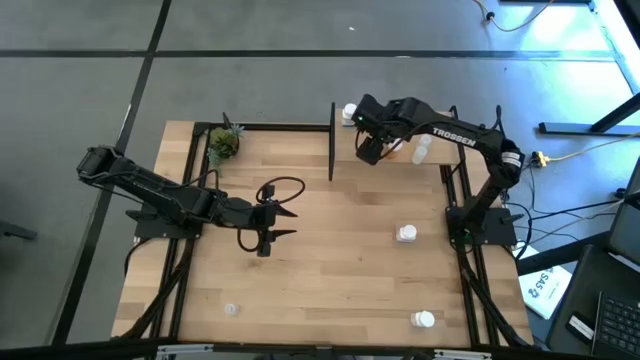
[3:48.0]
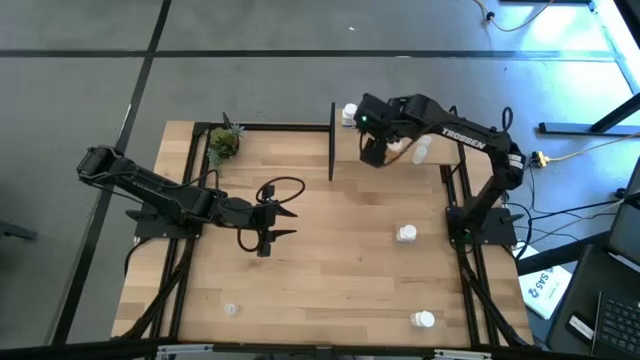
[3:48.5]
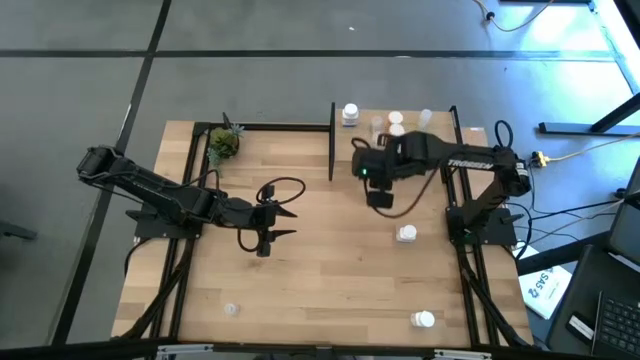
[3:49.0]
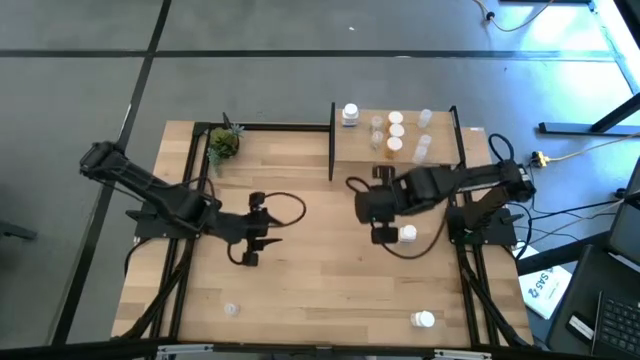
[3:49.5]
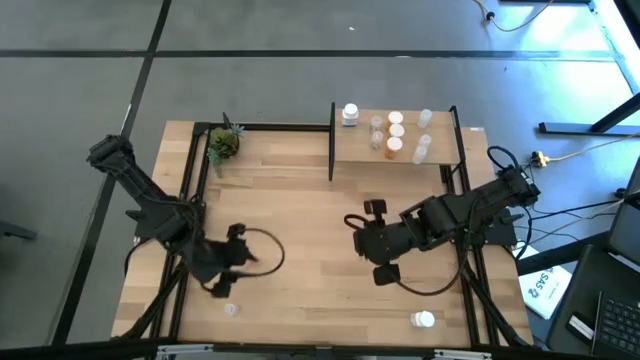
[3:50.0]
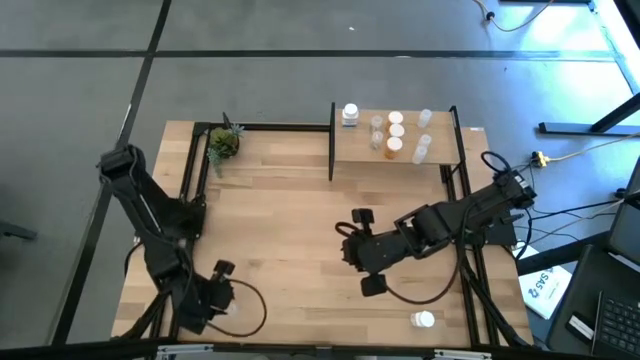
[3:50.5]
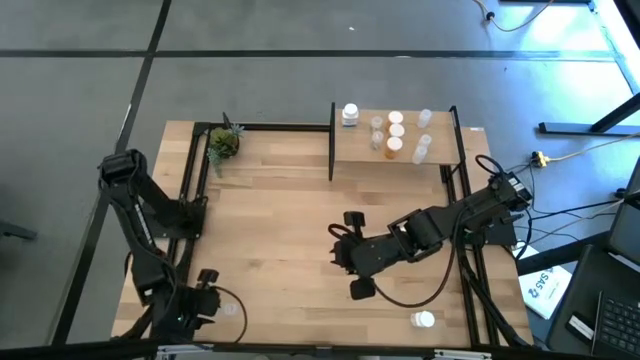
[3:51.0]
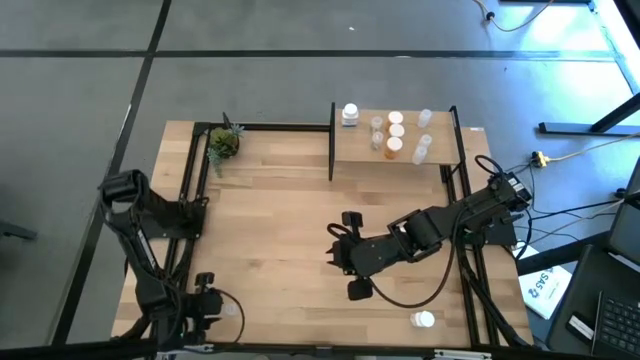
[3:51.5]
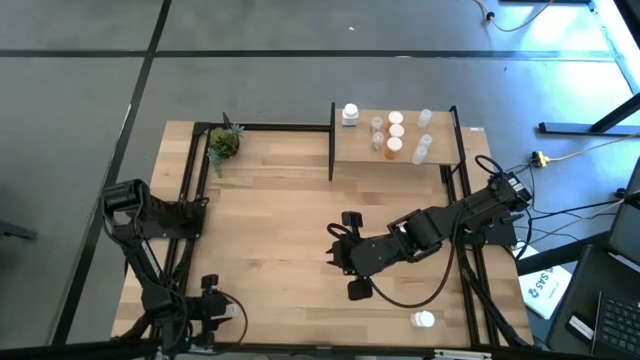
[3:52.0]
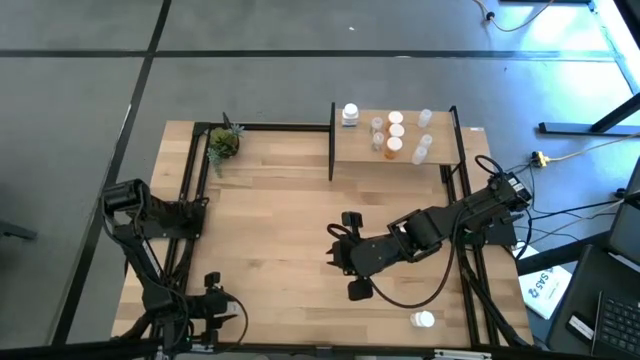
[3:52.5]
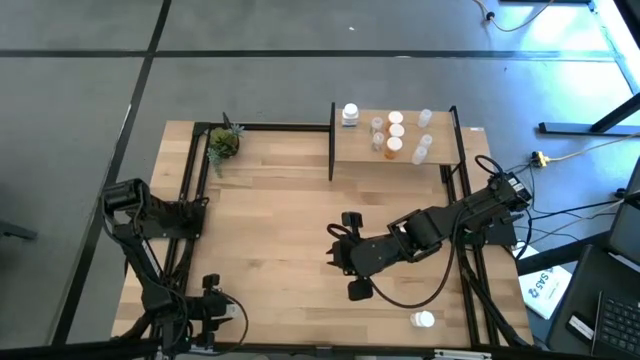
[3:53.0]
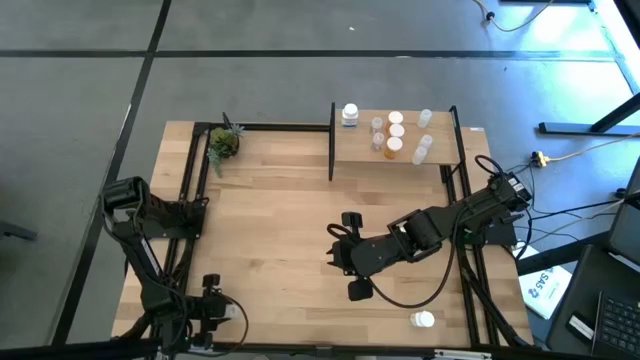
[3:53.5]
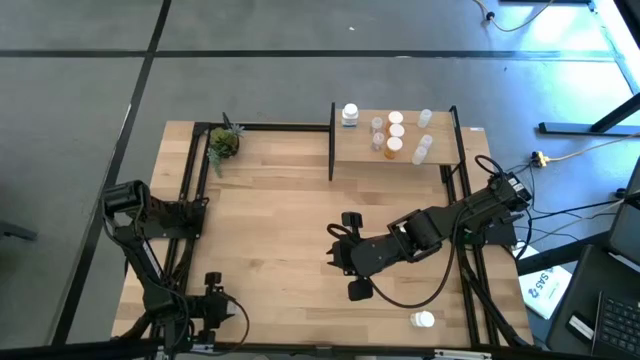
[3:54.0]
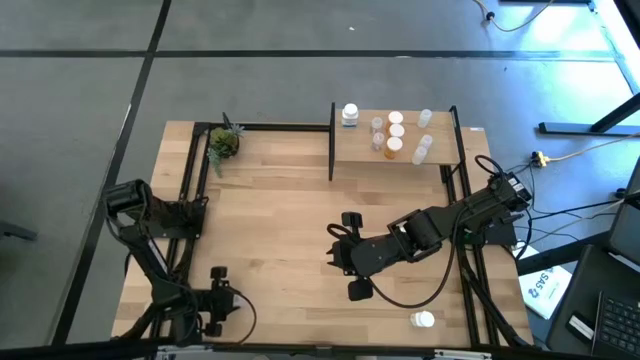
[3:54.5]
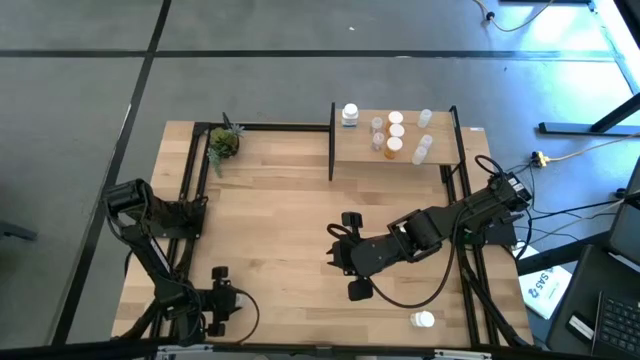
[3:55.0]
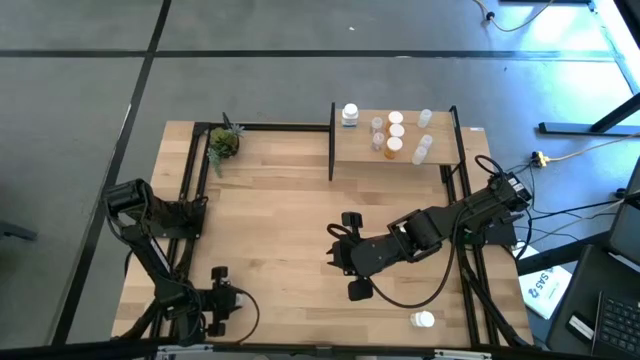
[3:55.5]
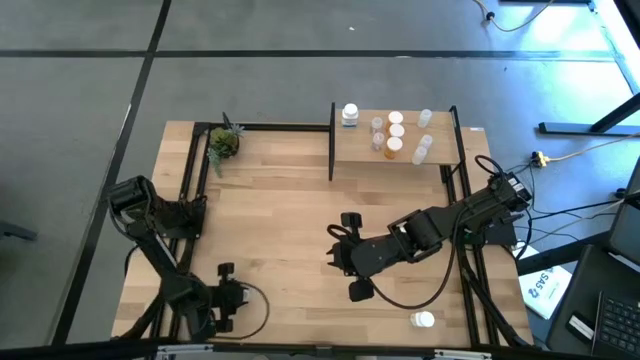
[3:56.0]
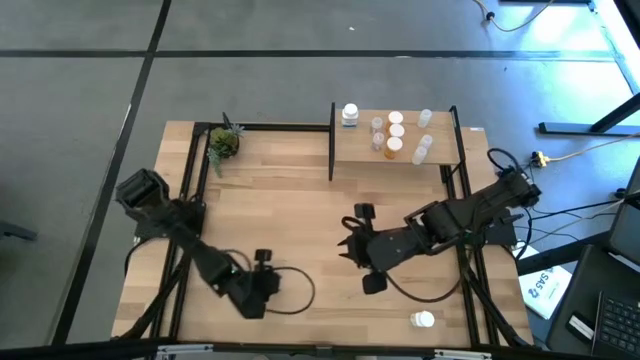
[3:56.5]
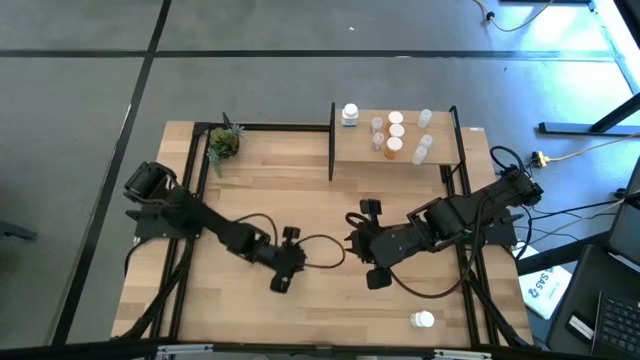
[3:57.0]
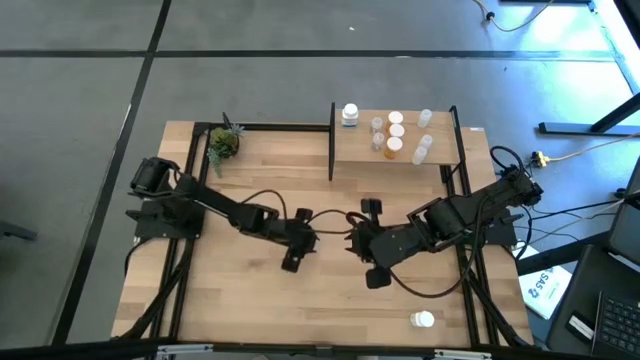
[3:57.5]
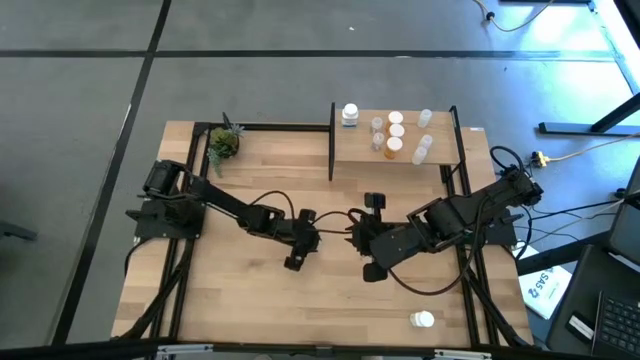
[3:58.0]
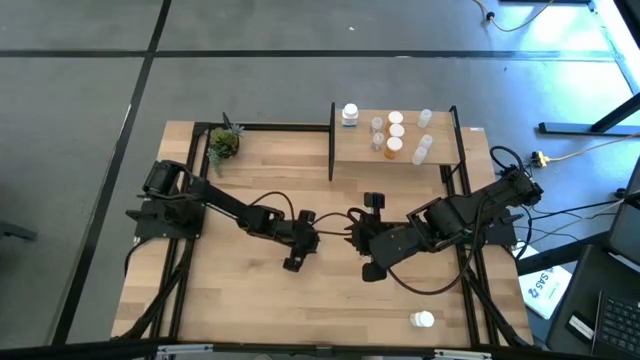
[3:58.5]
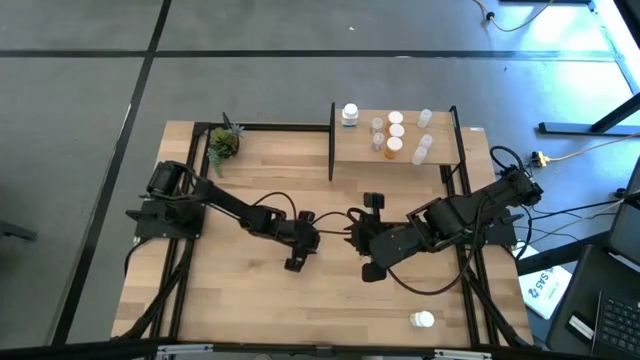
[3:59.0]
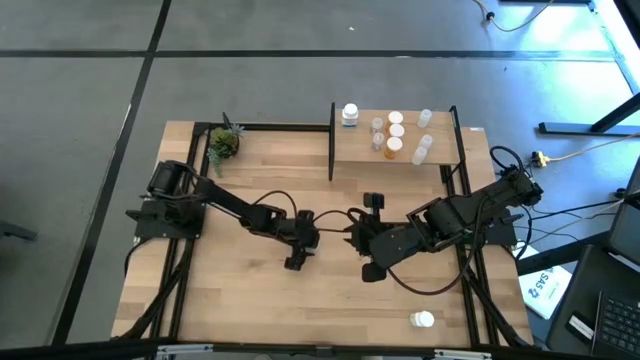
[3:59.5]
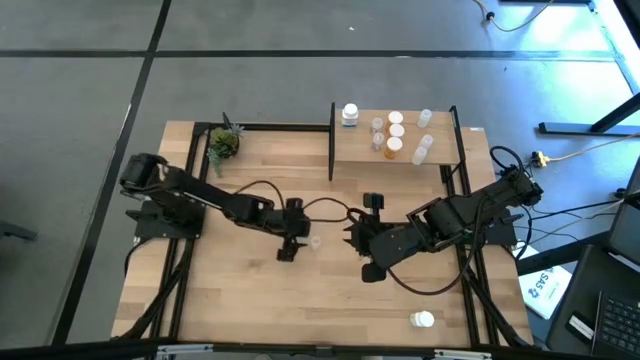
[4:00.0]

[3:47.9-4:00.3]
Task: Pick and place medicine bottles onto shelf by color
Put the green transparent pill bottle on the shelf aligned with the other green transparent pill bottle

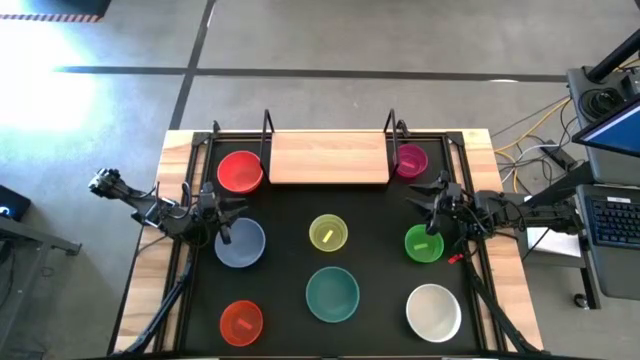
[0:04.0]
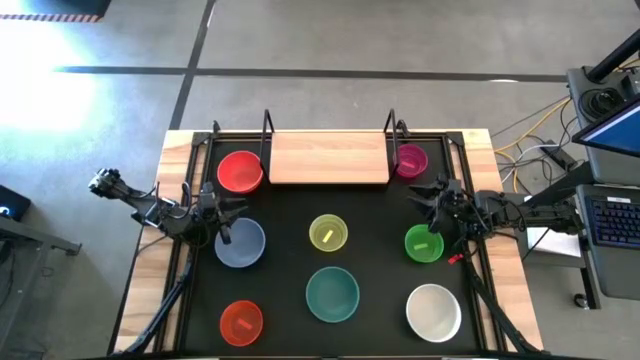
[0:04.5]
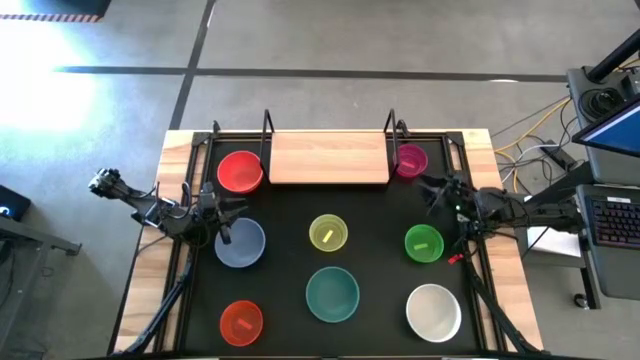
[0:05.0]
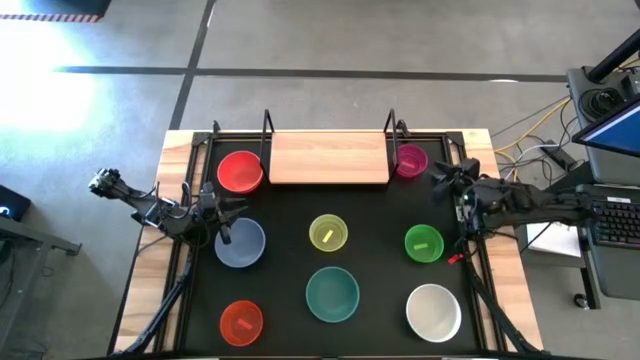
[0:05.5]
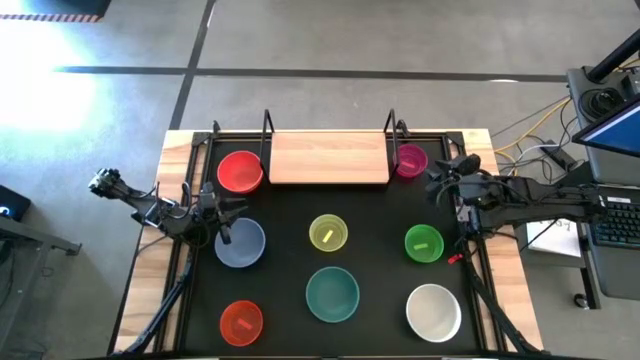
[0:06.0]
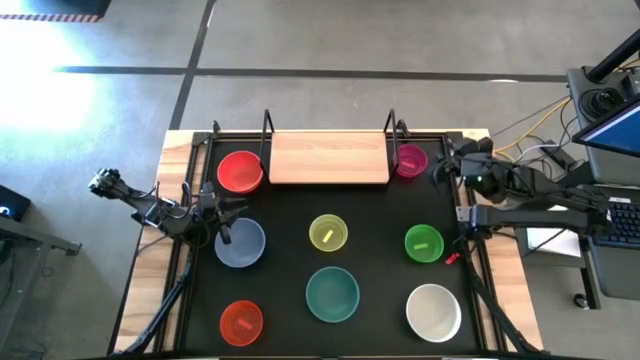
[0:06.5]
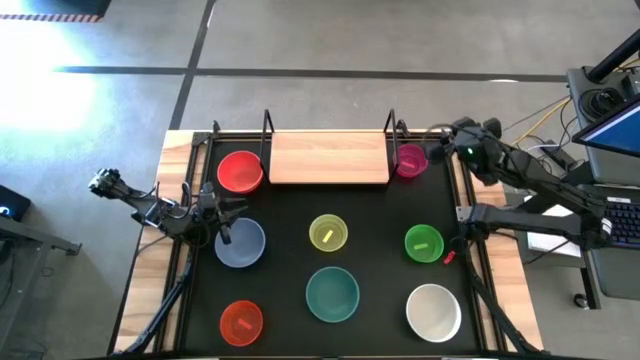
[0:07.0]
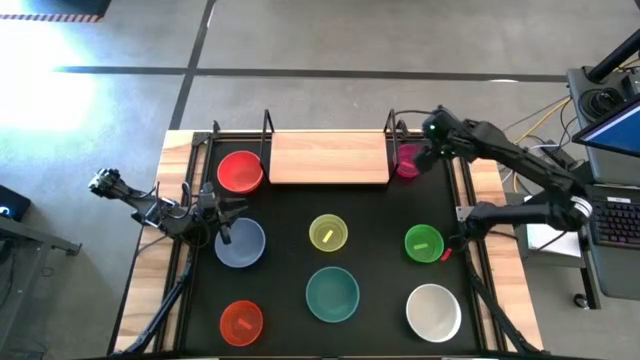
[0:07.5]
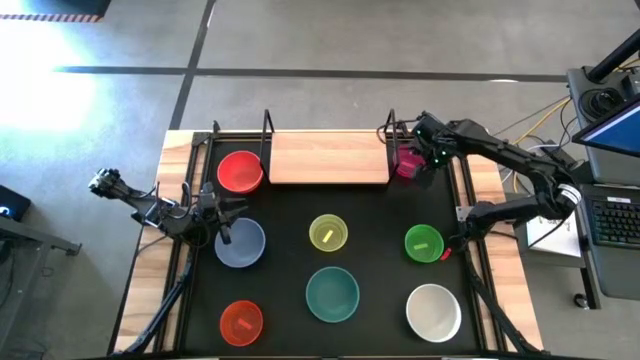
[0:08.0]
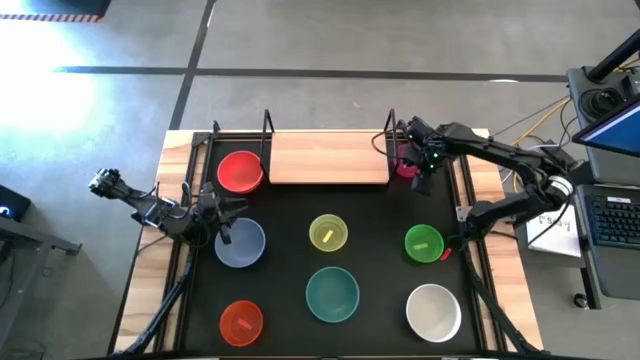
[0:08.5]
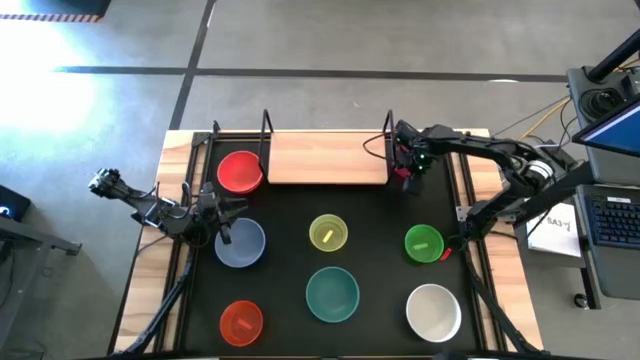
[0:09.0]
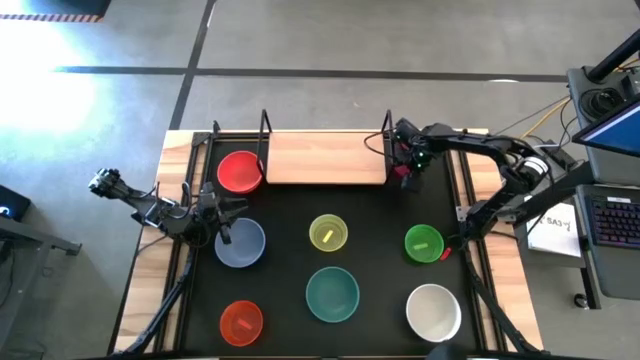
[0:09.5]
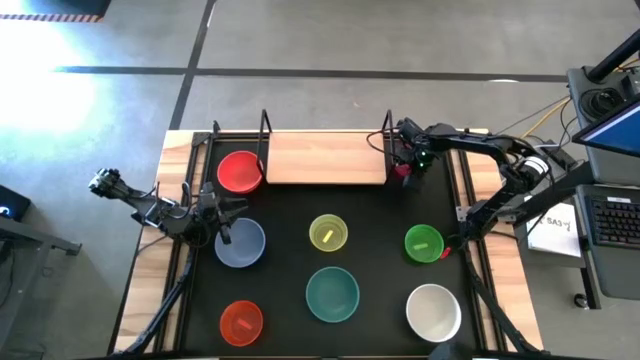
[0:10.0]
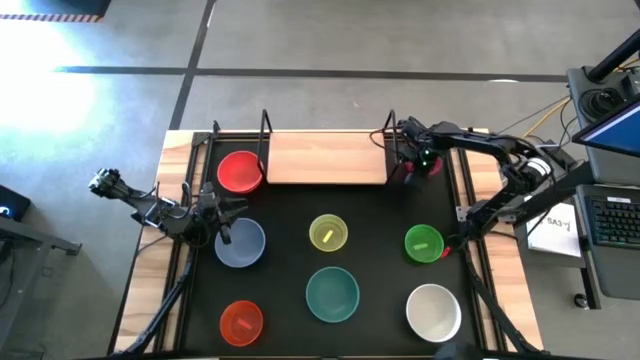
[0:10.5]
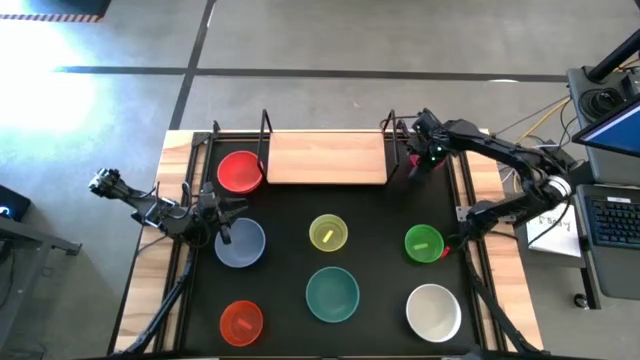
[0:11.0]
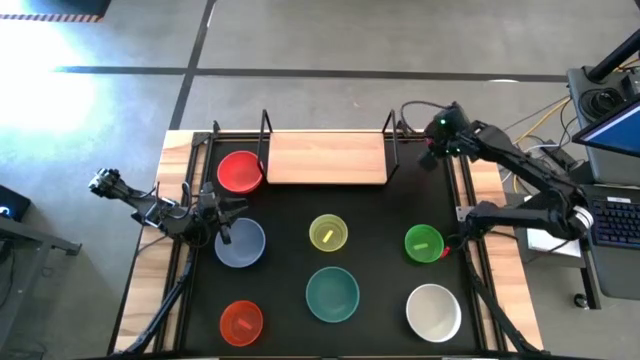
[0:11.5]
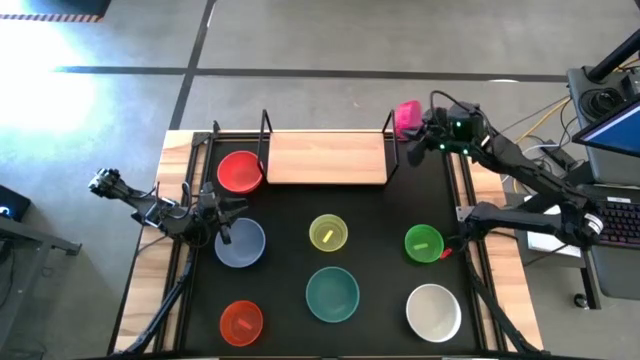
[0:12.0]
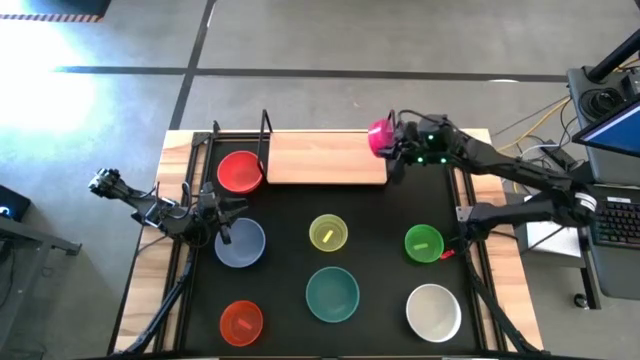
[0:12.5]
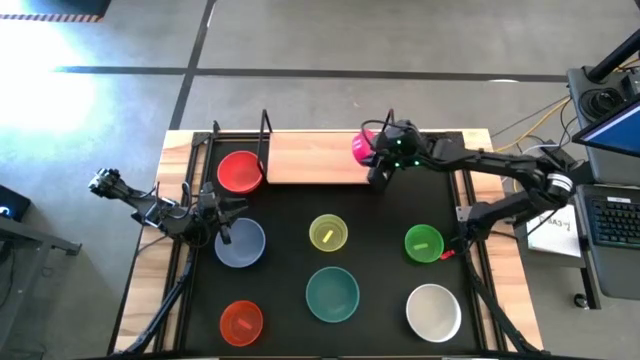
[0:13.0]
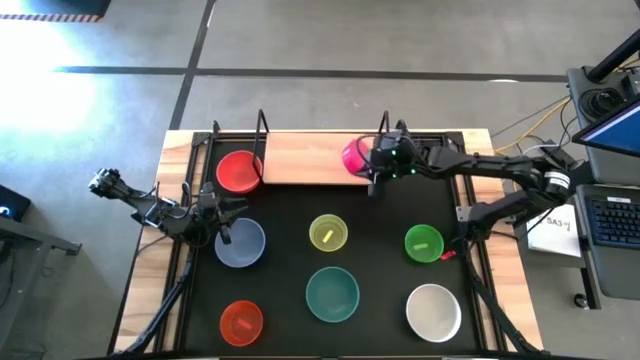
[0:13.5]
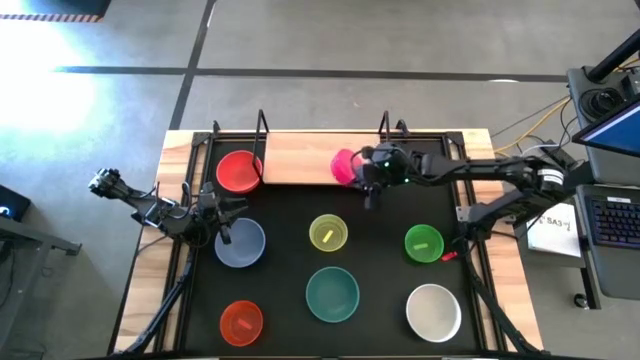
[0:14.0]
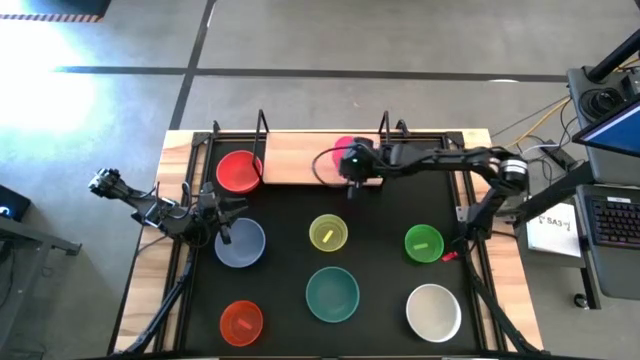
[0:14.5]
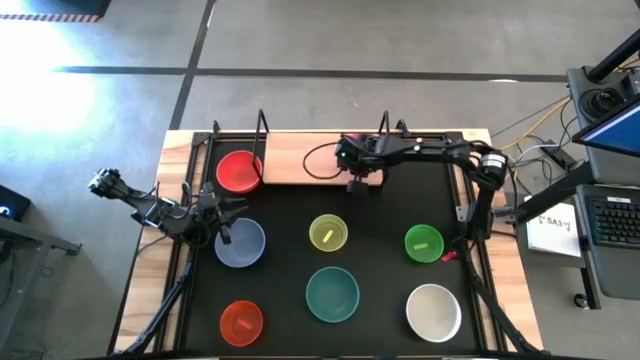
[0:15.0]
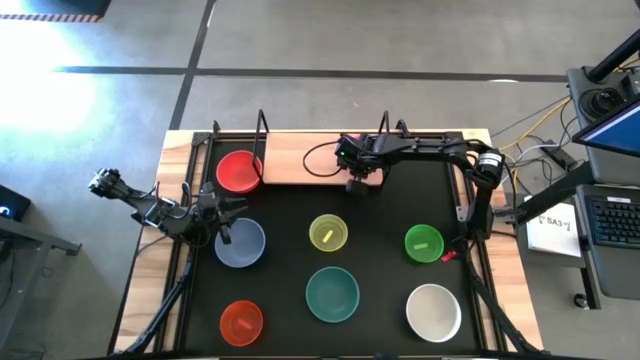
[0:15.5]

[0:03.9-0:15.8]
Task: Place and stack bowls onto a shelf
Put the light pink bowl on the shelf
